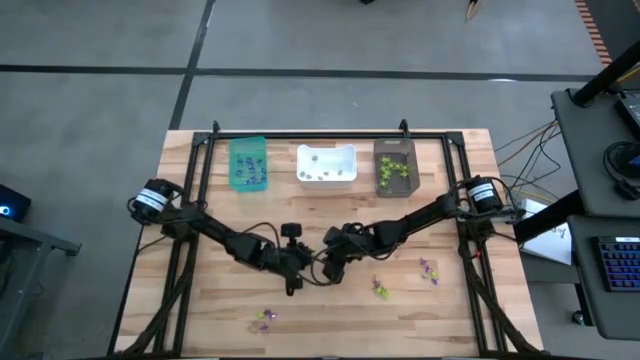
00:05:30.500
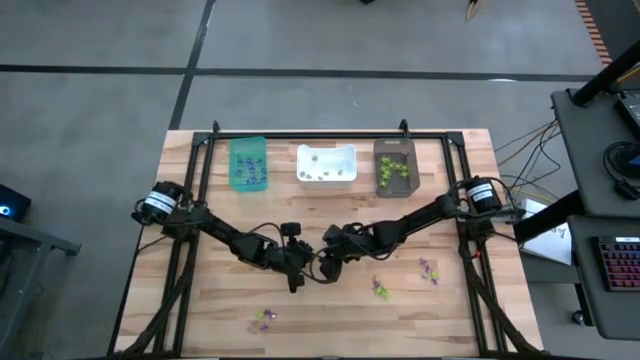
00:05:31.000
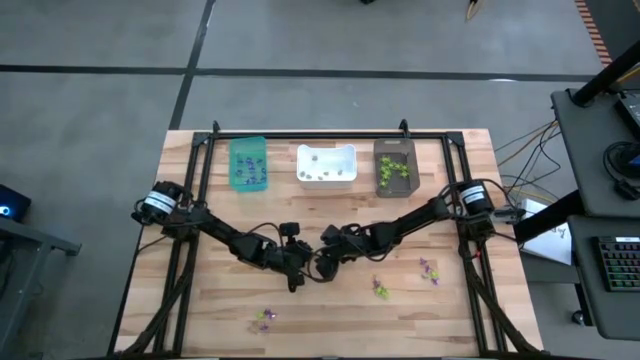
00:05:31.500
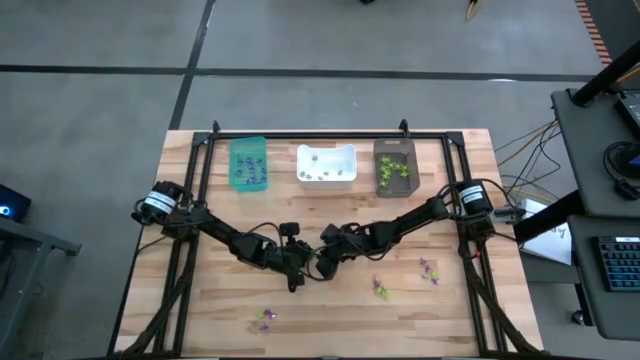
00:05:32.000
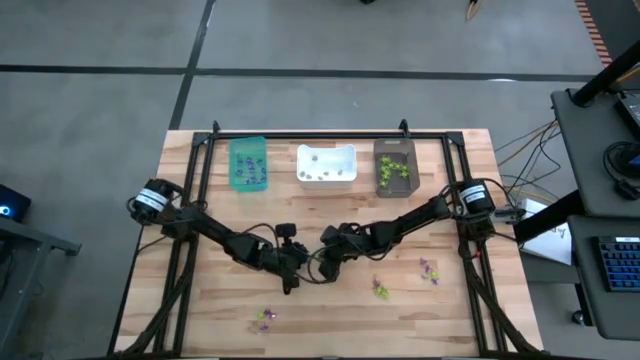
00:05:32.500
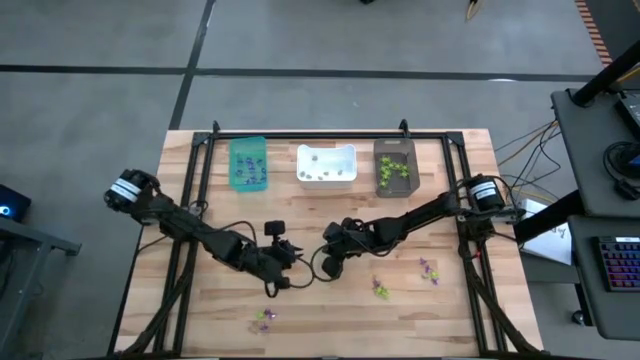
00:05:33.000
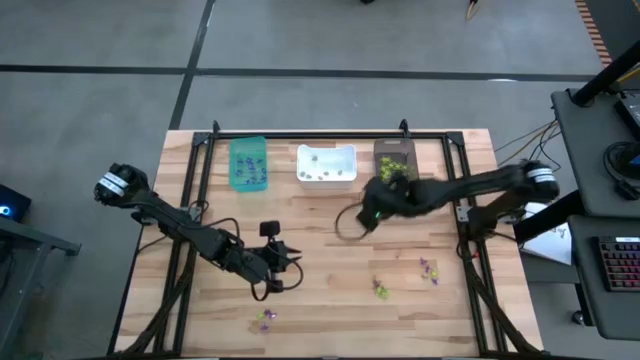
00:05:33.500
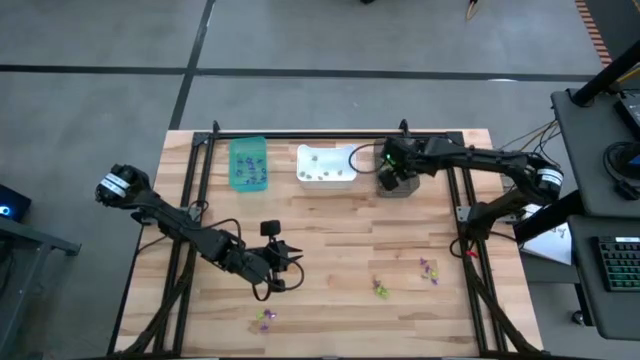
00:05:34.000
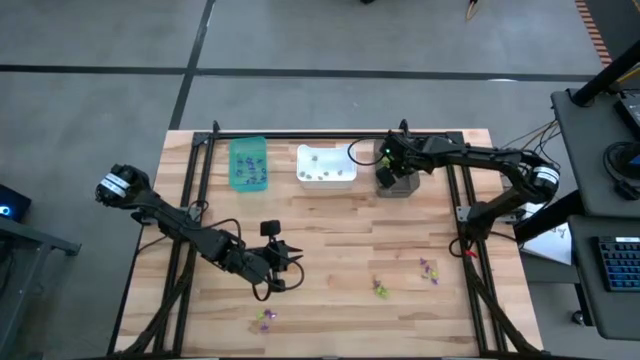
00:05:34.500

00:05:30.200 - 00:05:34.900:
Task: Sort Halloween decoration
Put the green spider toy into the black bin

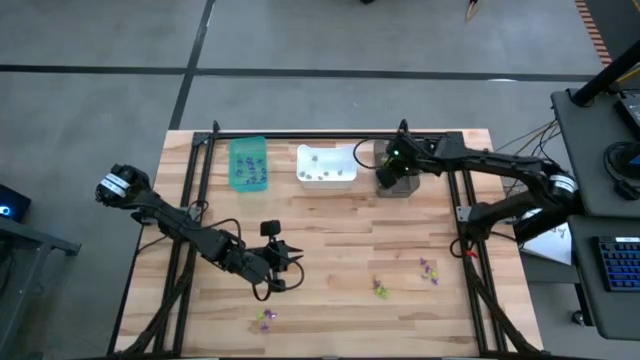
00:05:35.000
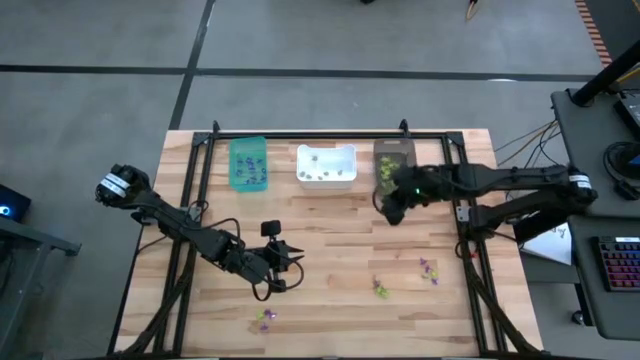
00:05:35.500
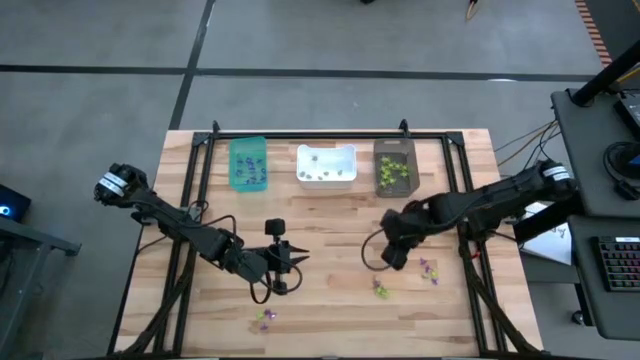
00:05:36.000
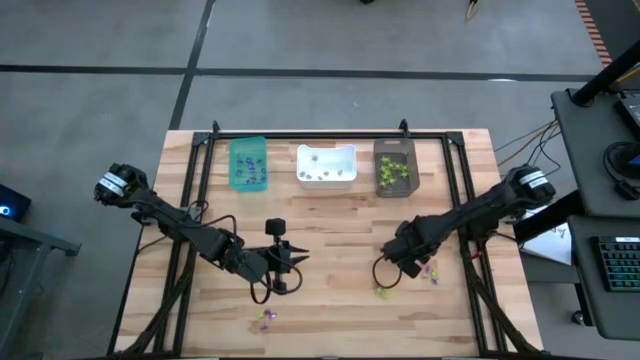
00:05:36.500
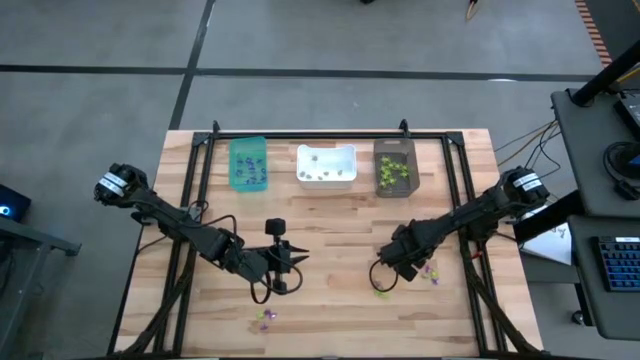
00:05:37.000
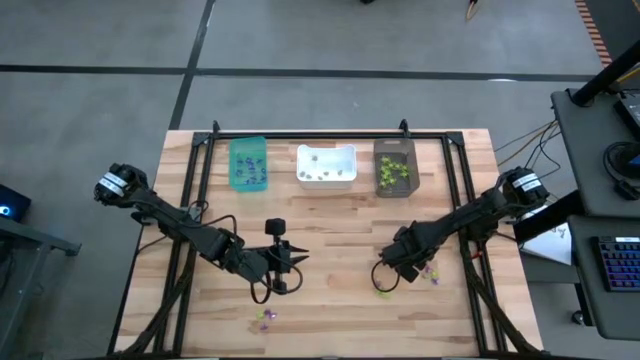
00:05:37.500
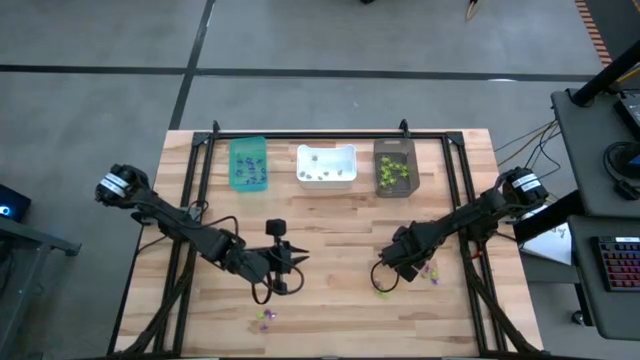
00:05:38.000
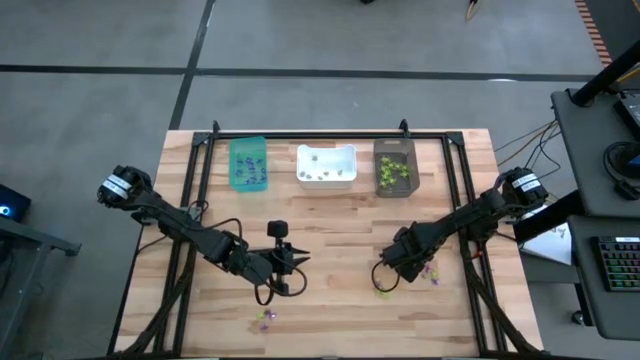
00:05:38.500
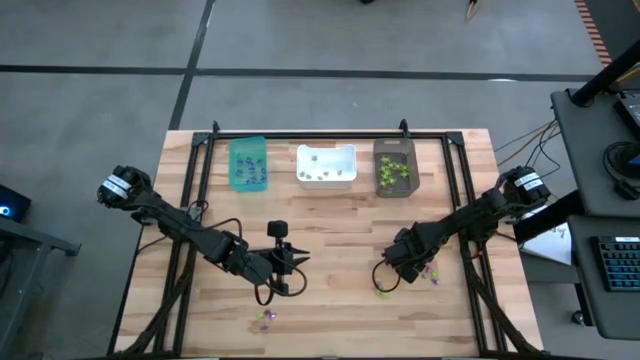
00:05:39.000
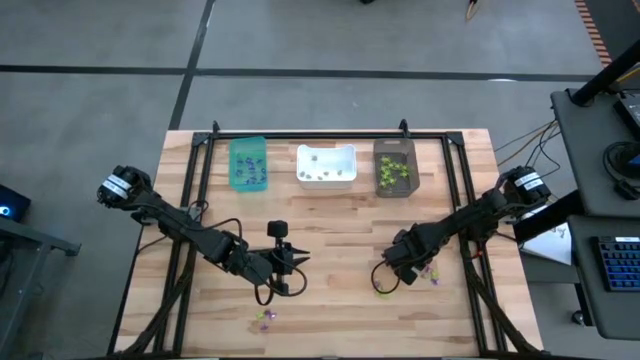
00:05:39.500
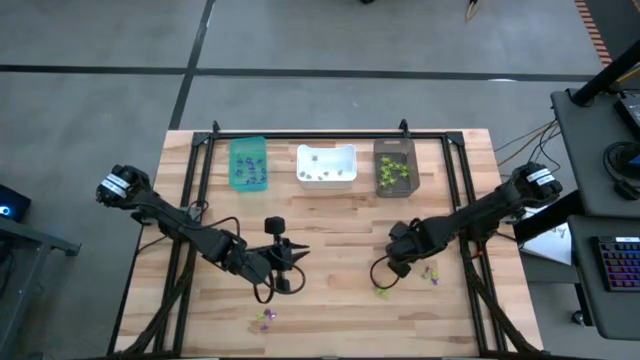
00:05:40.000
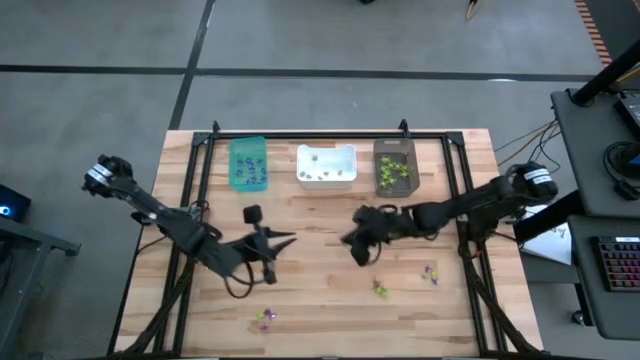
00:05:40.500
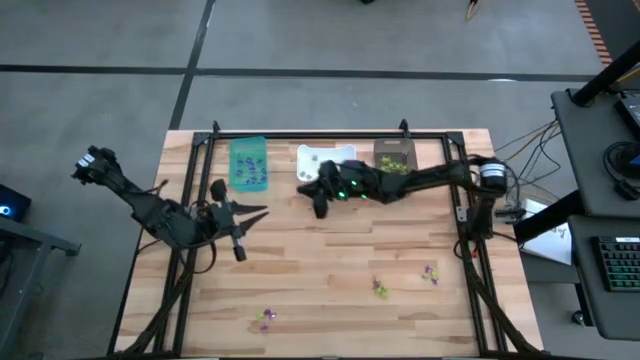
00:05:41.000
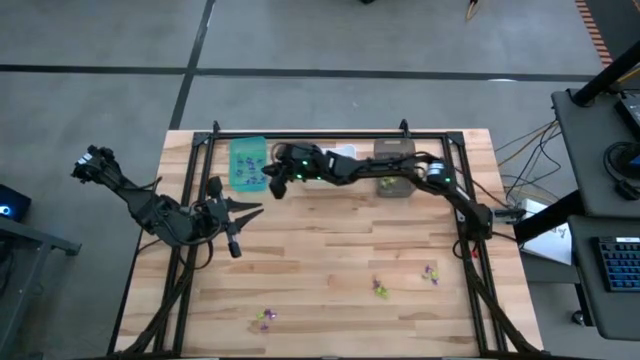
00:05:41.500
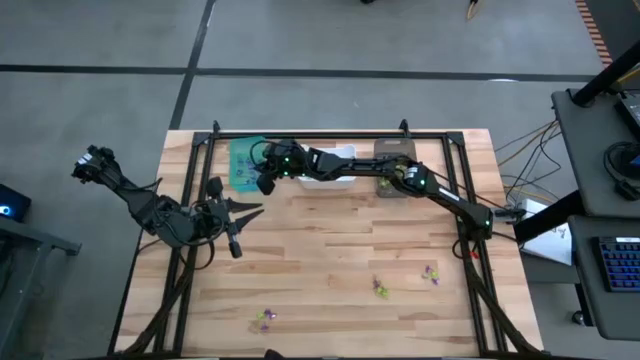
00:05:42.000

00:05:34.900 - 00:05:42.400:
Put the purple witch hat toy into the green bin

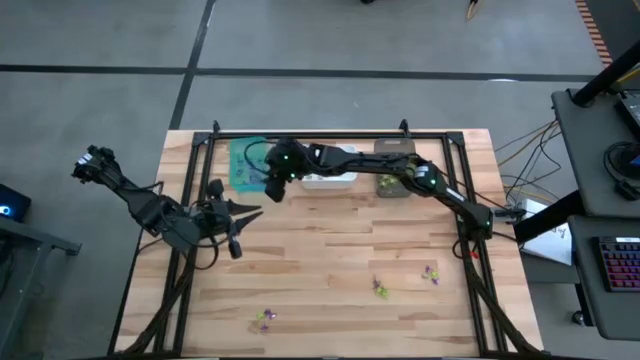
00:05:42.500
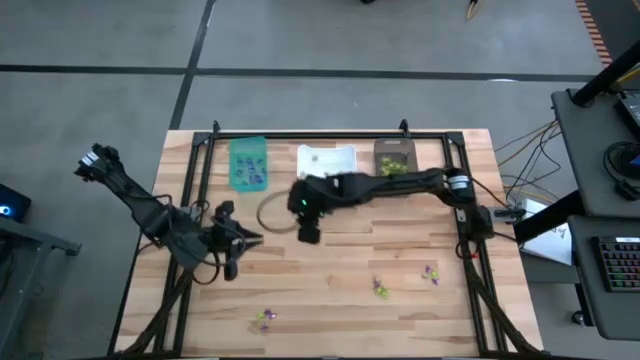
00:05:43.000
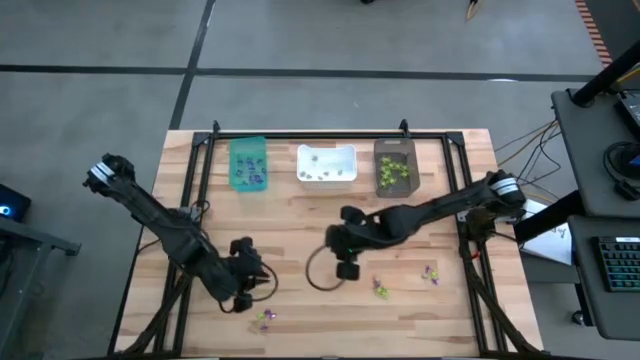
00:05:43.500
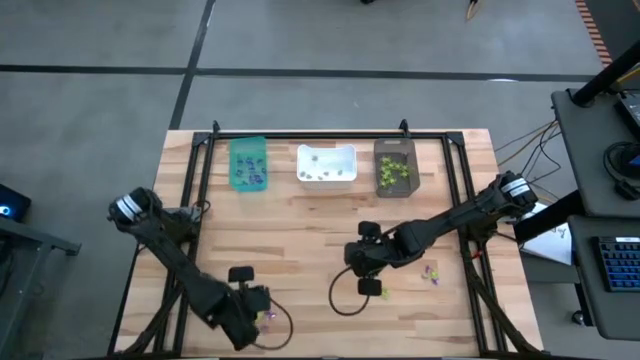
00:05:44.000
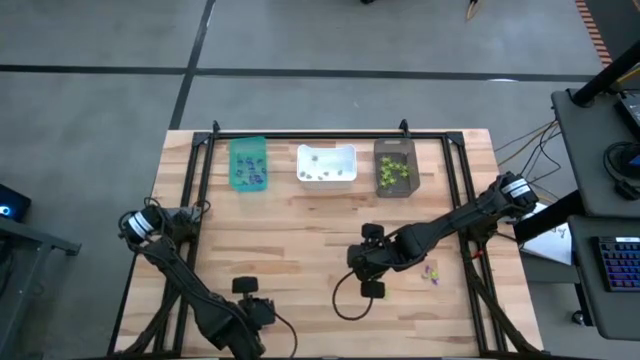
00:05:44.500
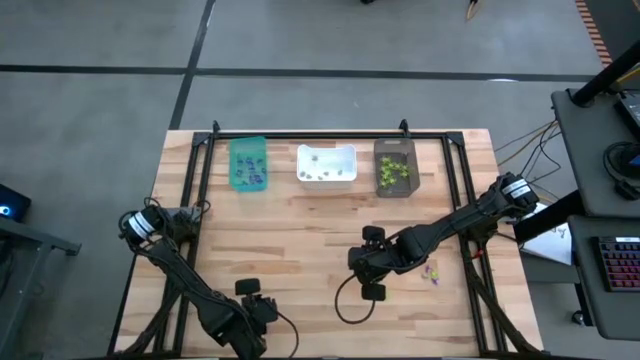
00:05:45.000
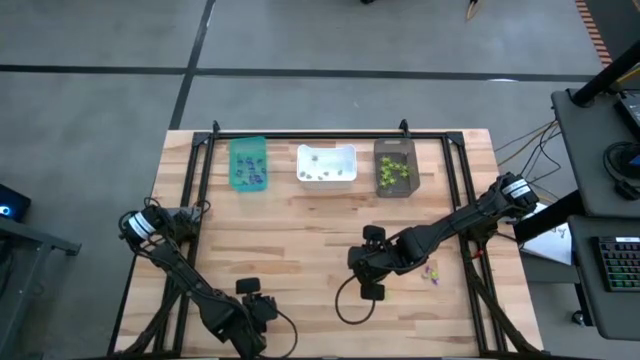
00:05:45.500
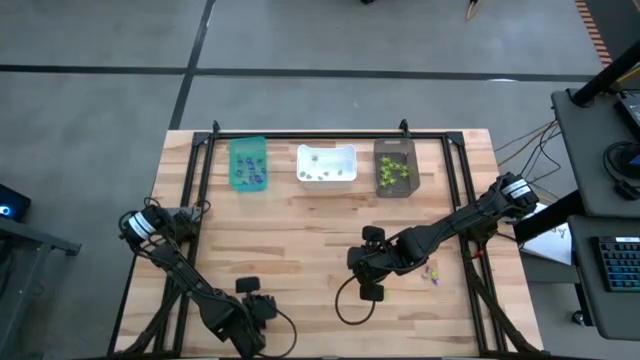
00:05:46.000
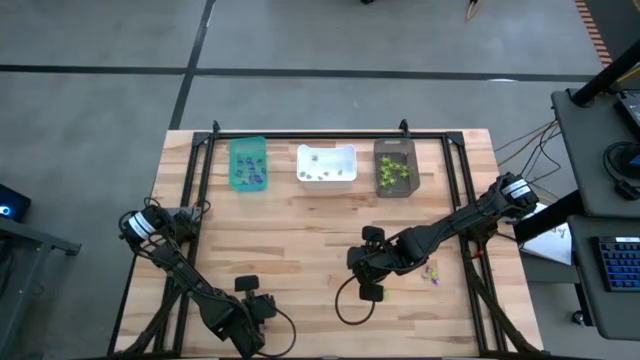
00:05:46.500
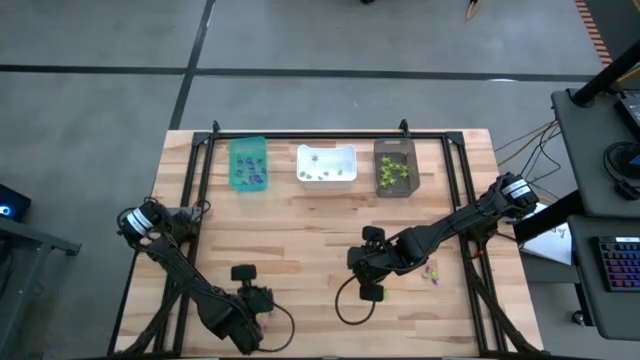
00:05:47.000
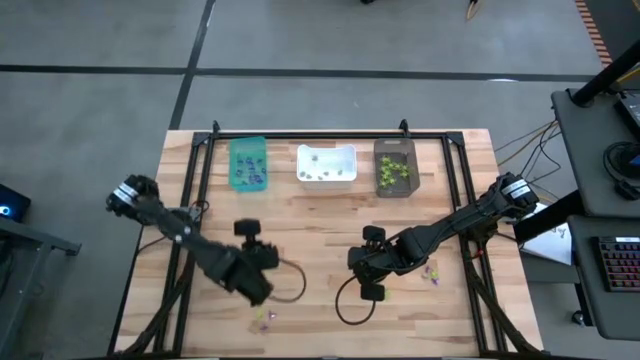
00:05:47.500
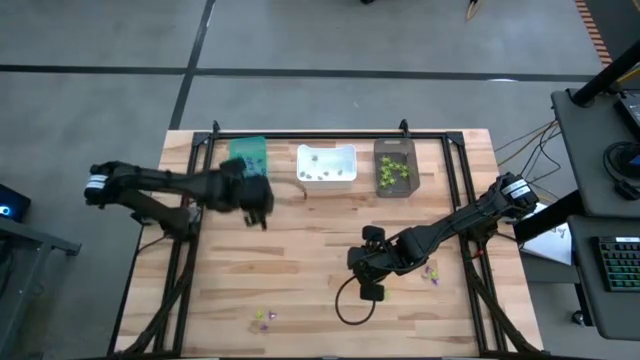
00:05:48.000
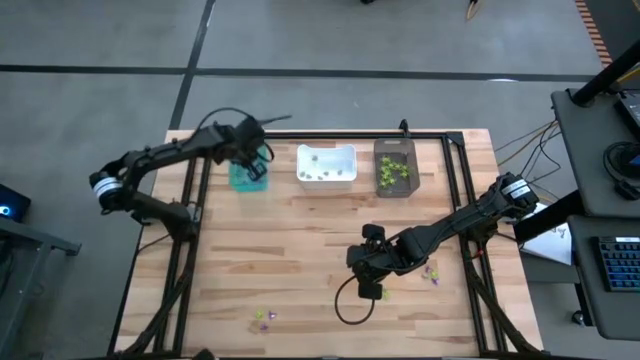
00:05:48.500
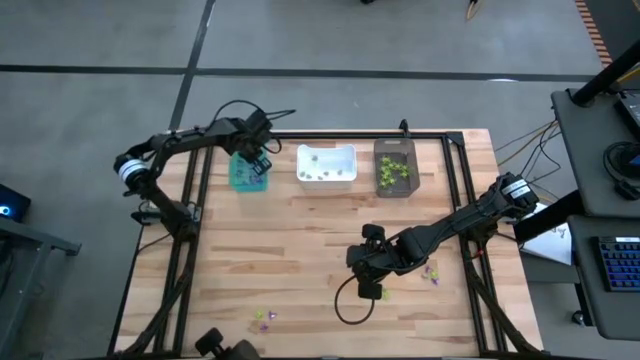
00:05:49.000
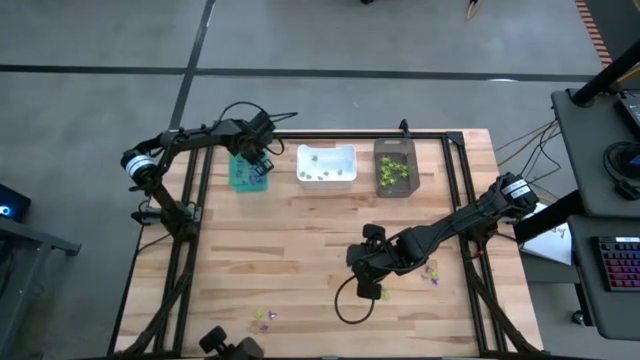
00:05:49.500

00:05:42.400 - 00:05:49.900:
Put the purple witch hat toy into the light blue bin

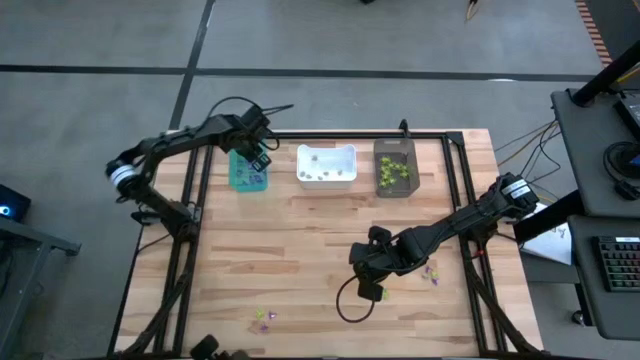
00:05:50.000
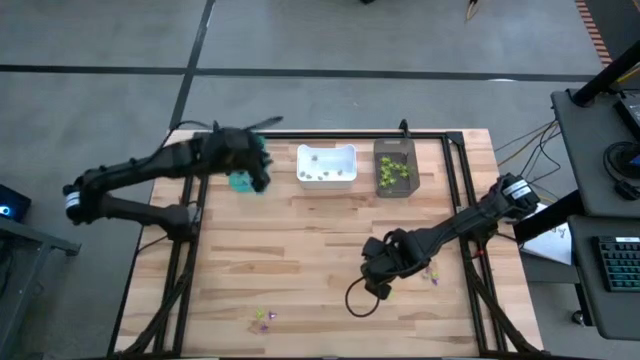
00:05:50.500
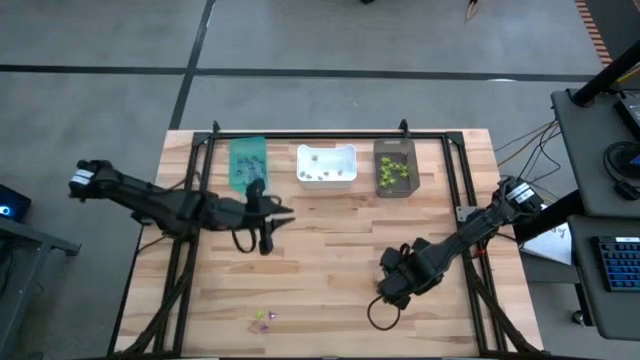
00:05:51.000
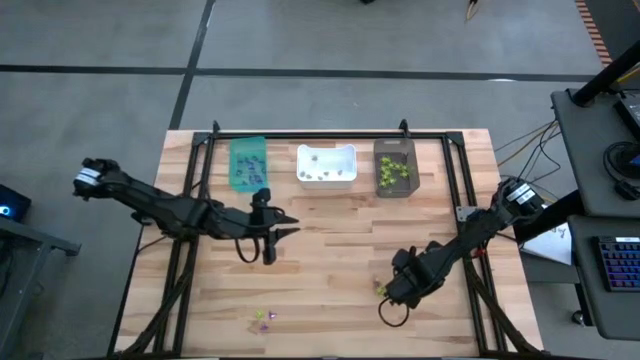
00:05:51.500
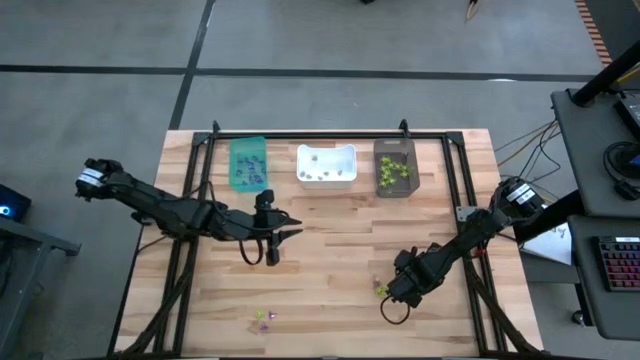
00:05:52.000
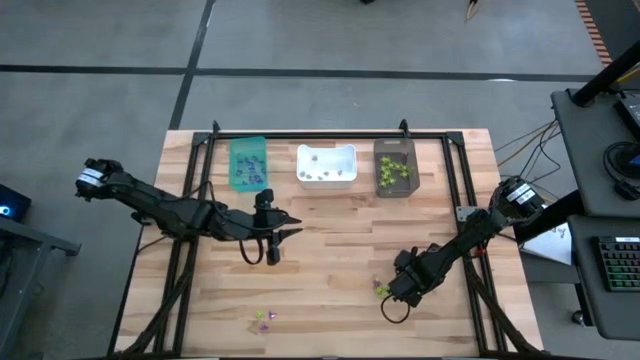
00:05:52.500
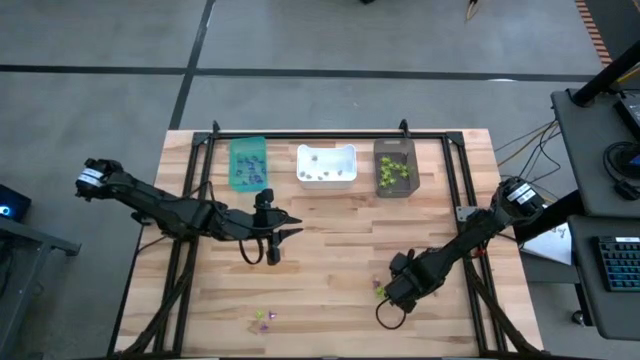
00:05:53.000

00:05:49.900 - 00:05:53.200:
Put the white skull toy into the white bin
